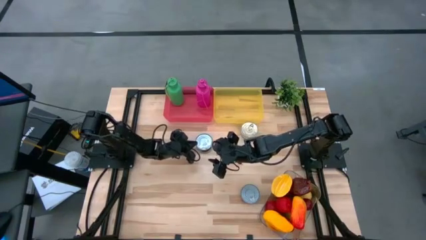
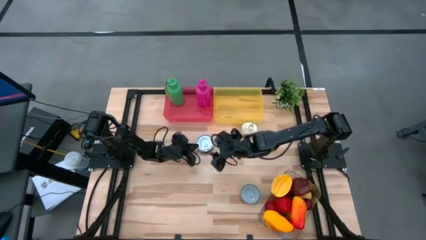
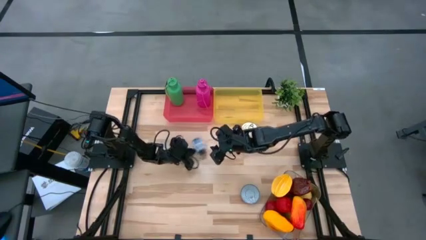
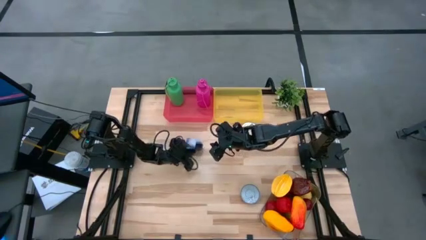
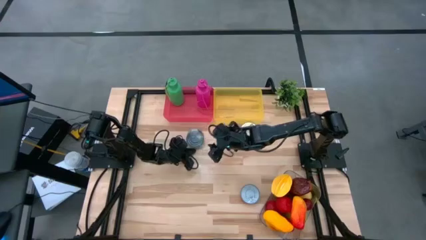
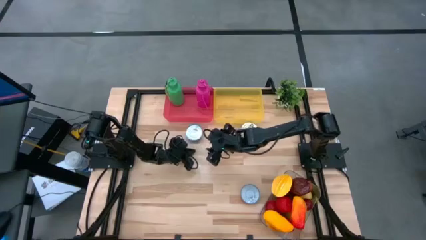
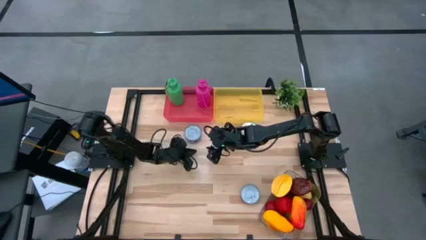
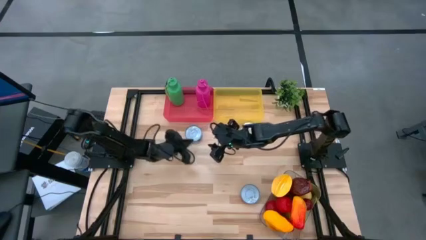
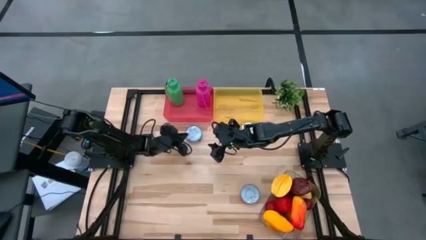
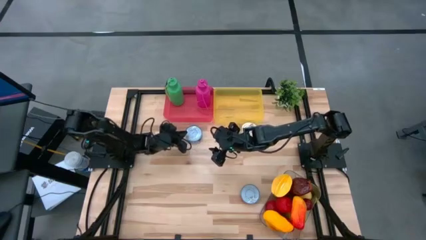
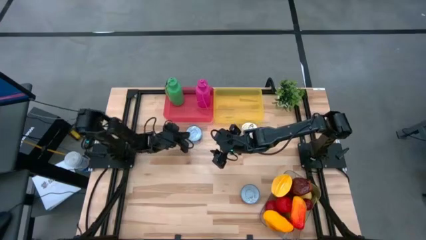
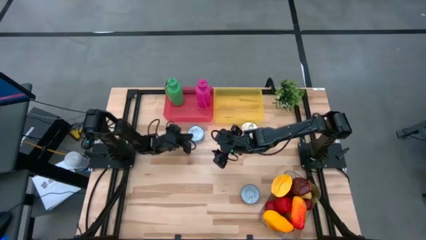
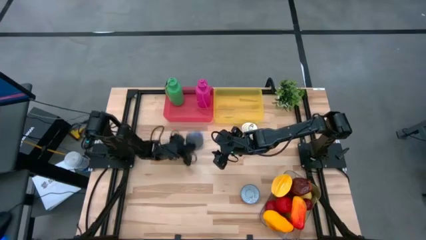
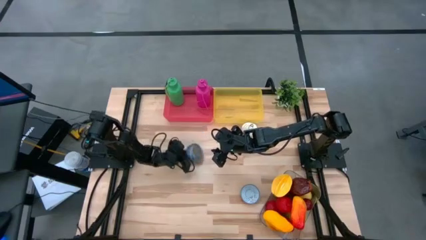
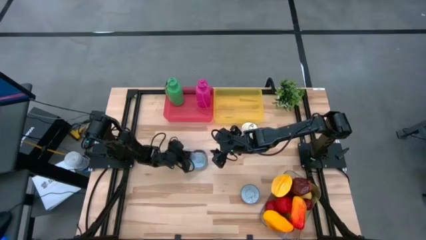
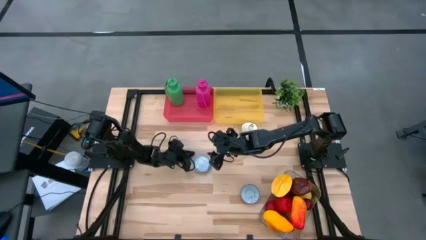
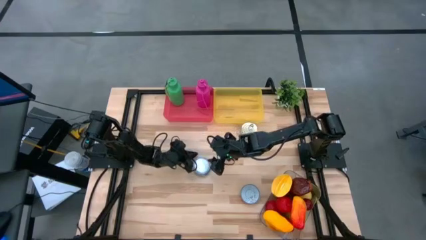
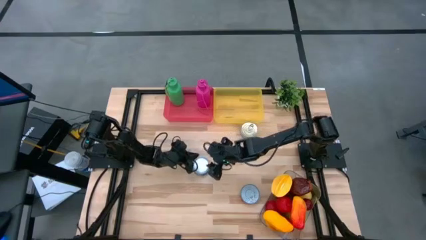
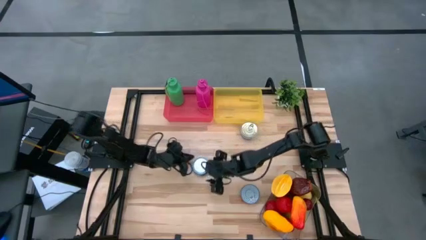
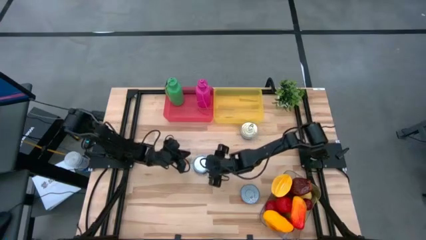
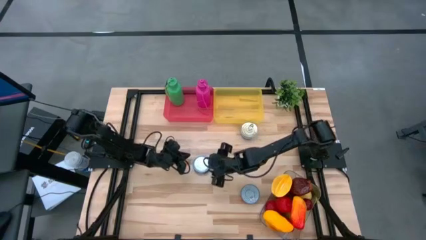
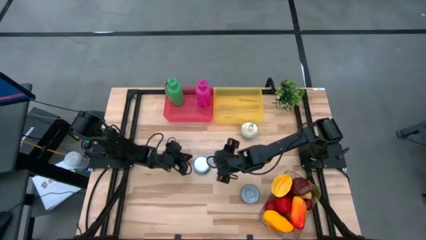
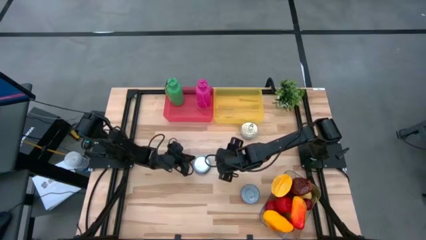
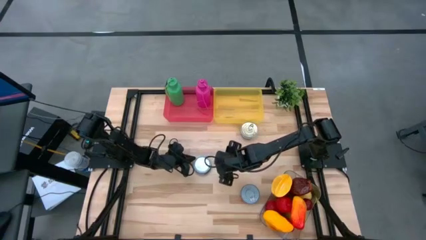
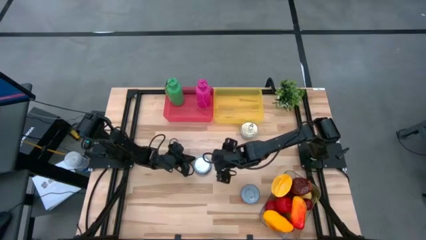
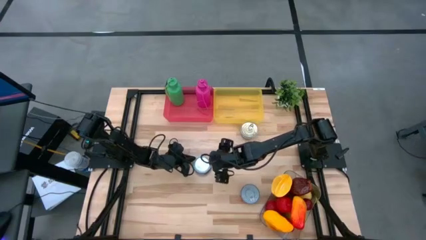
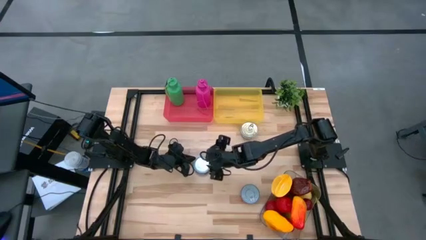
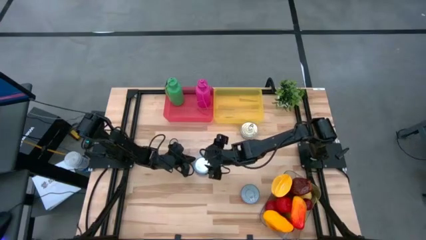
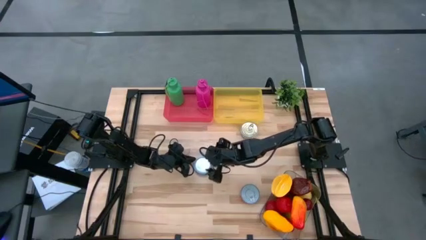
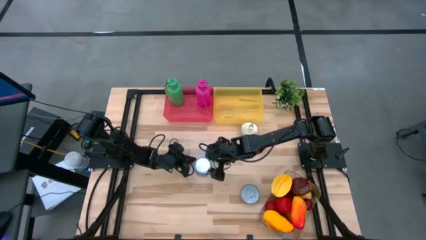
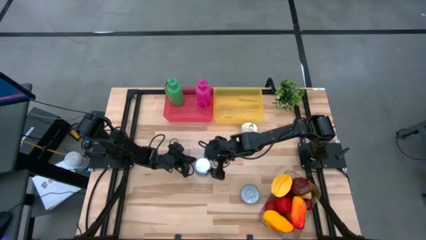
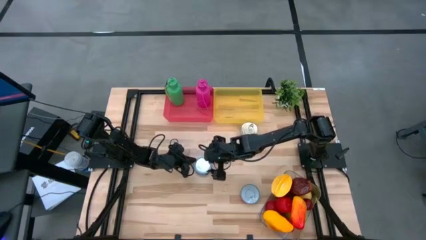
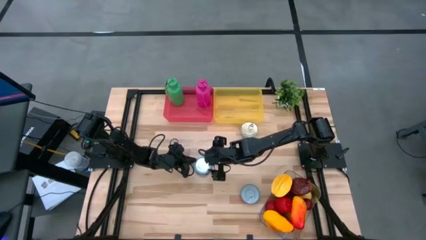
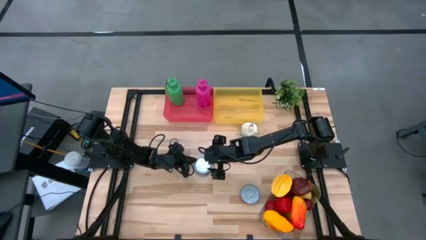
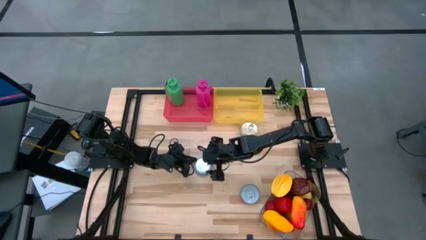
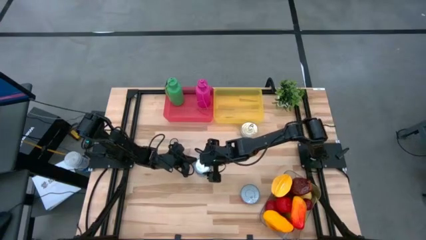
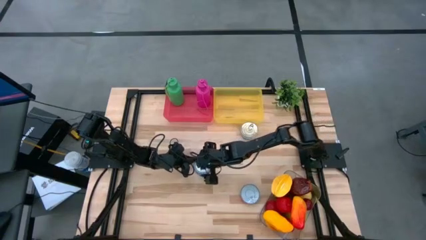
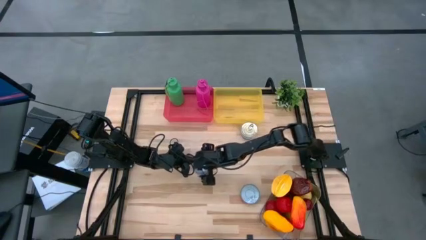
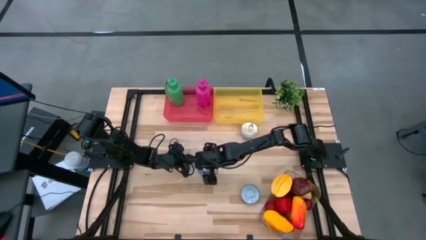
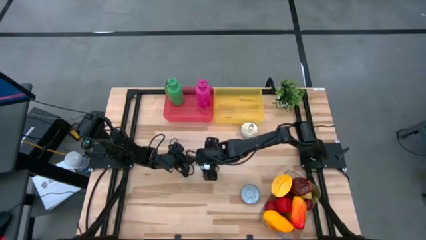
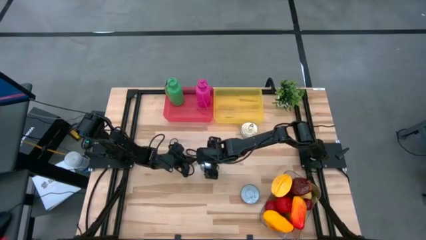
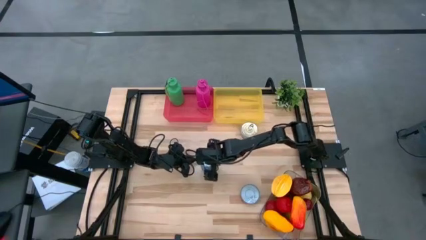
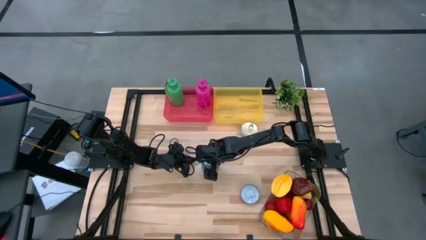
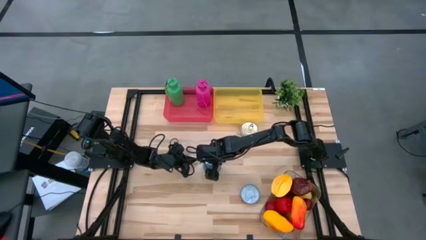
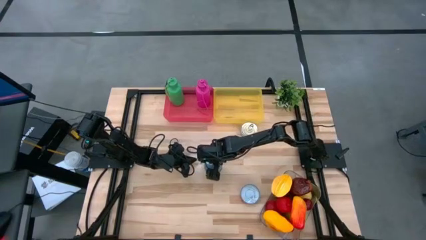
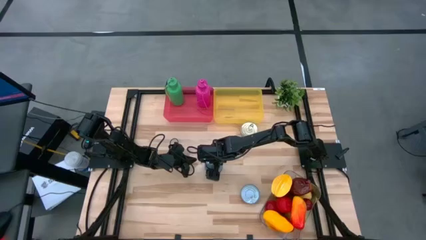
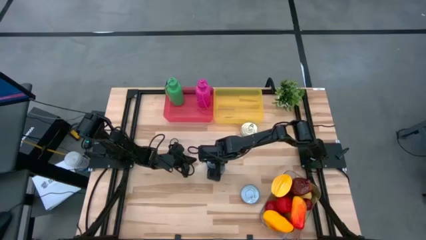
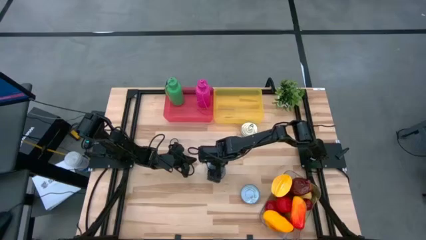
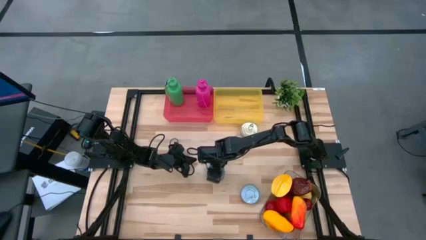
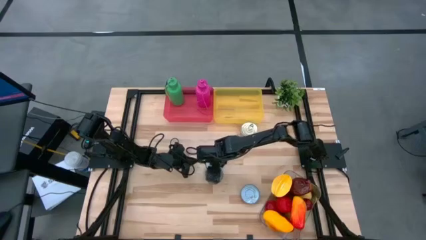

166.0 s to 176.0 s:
Task: Pick & Place Food Item
Put the blue tuna can into the yellow bin

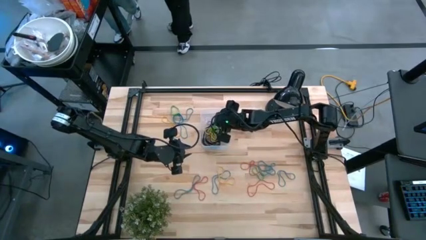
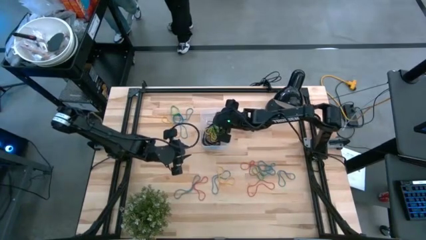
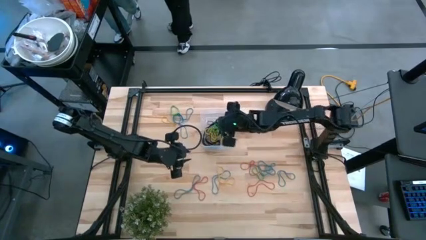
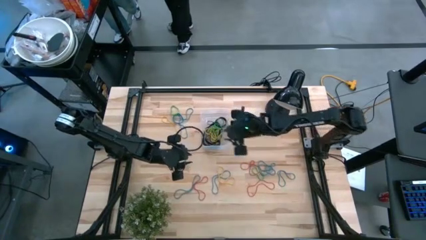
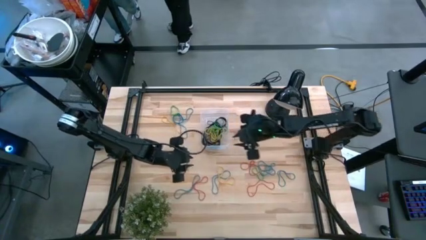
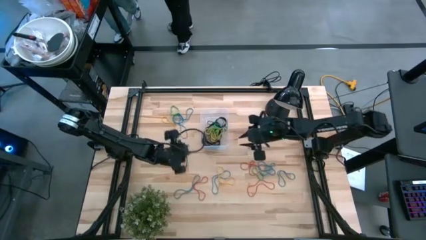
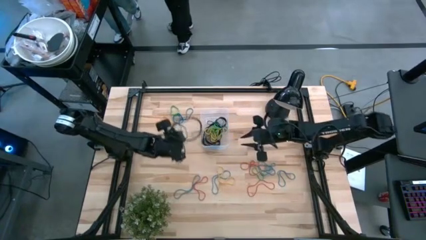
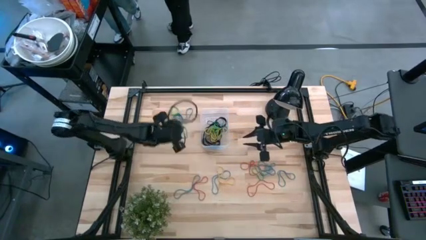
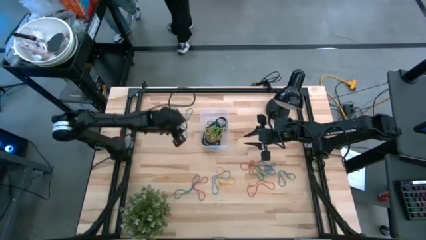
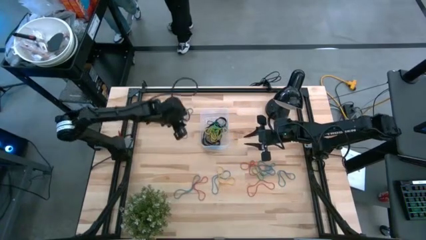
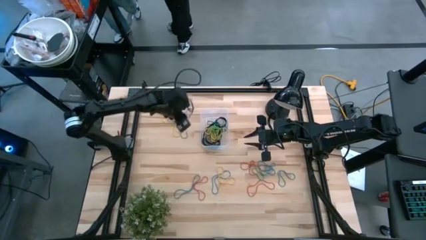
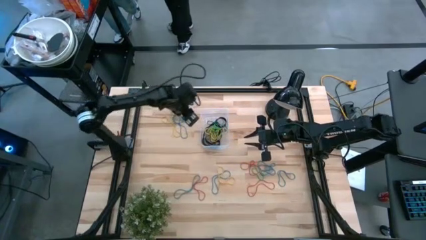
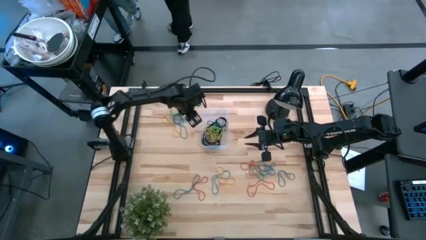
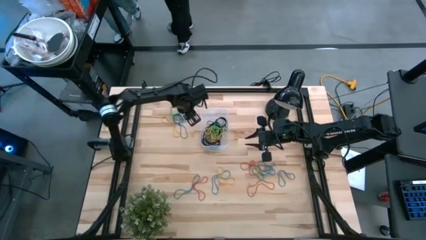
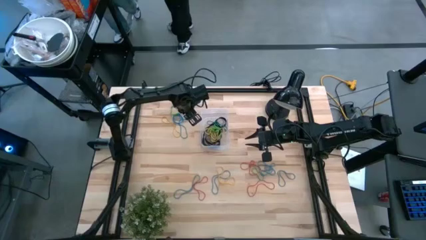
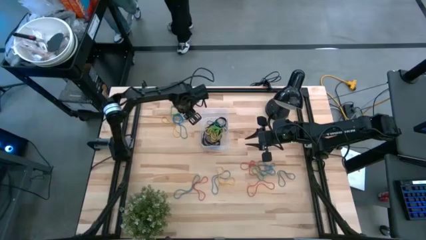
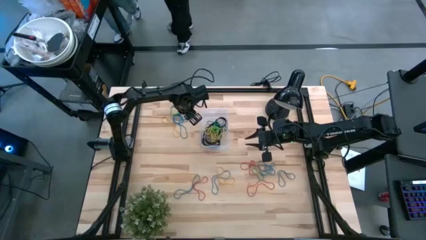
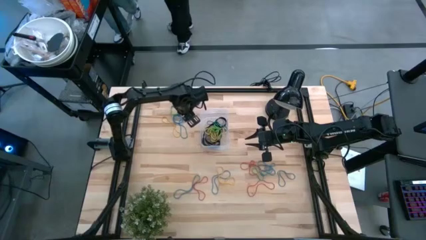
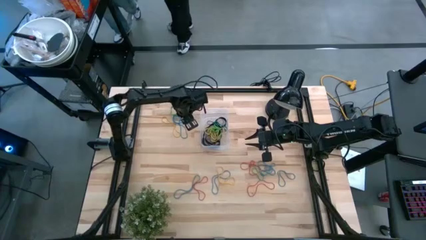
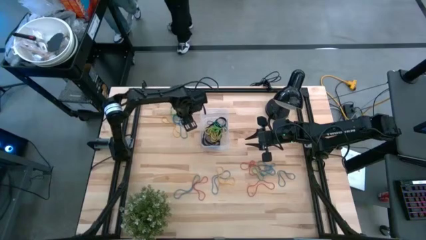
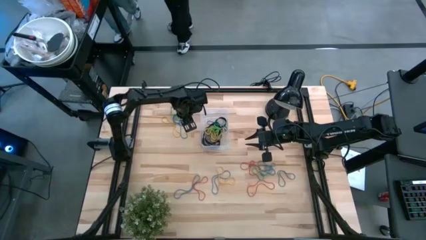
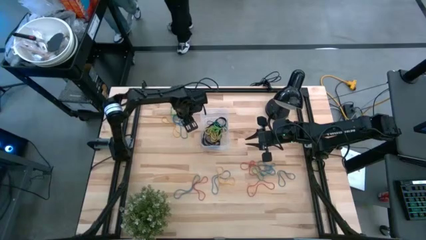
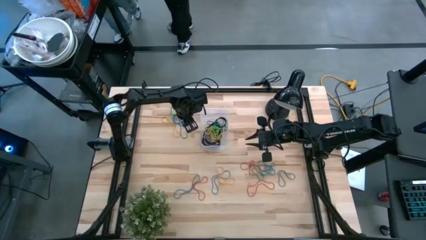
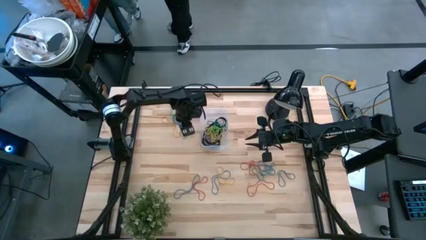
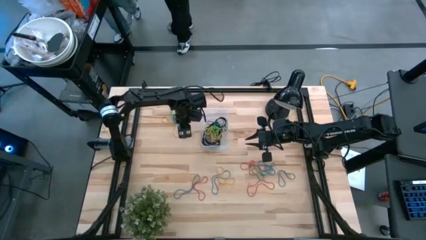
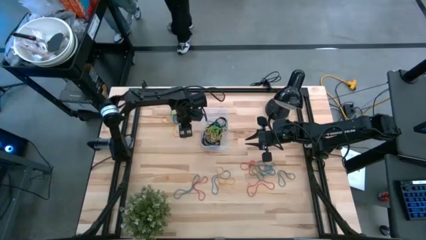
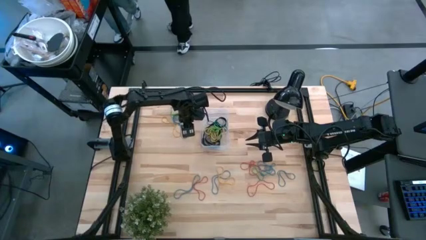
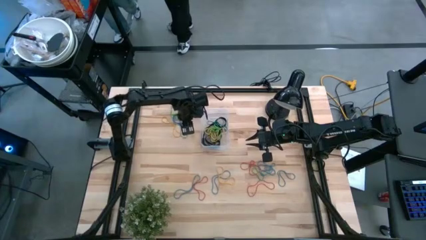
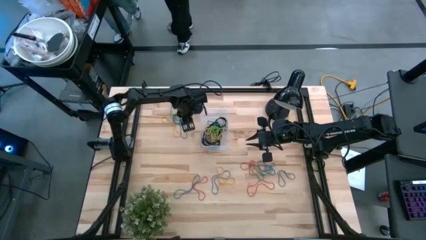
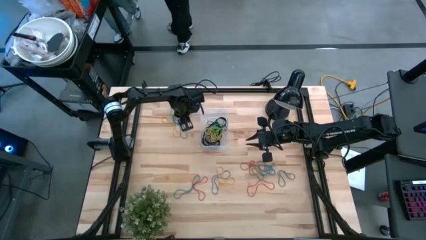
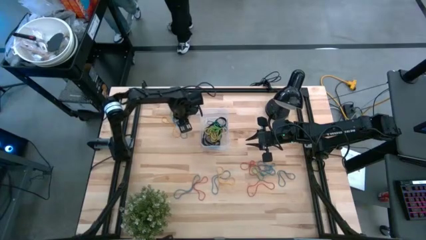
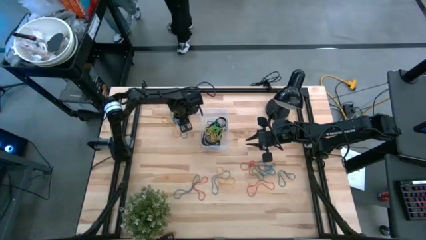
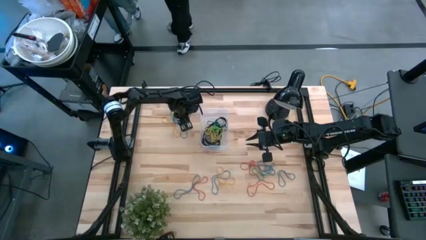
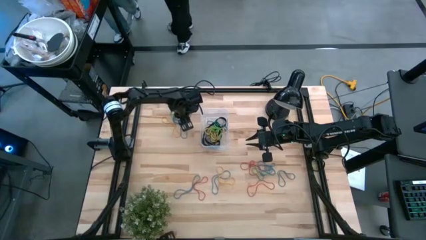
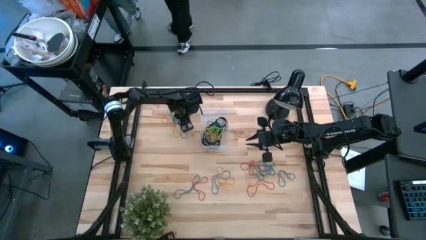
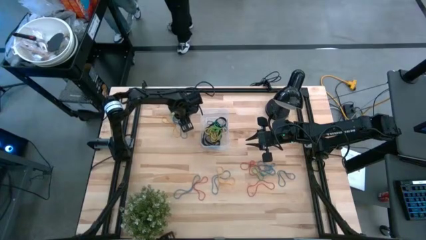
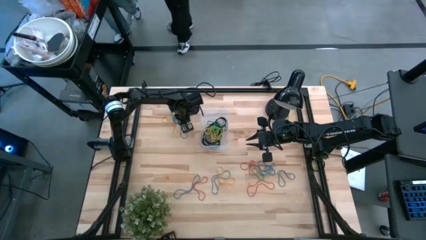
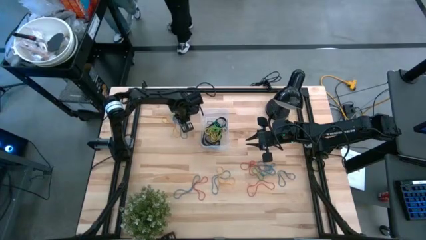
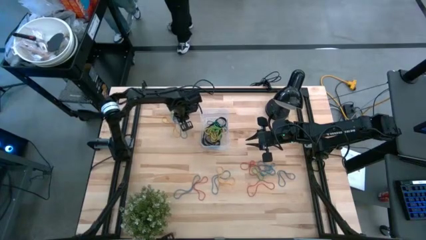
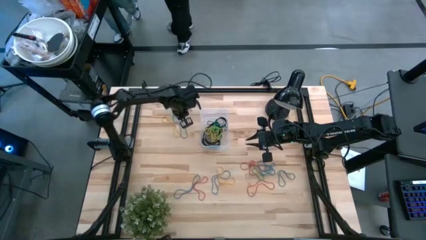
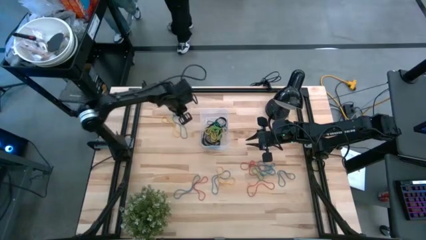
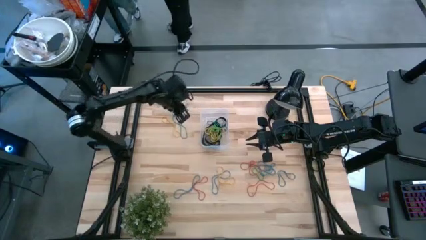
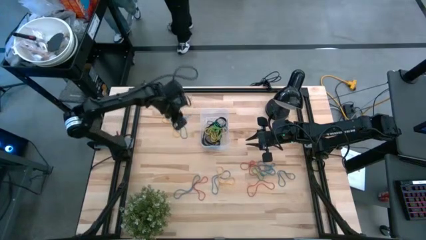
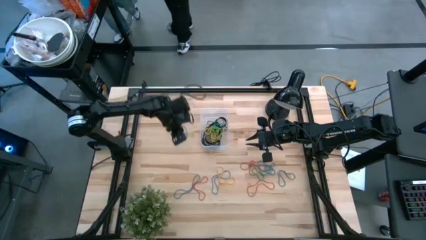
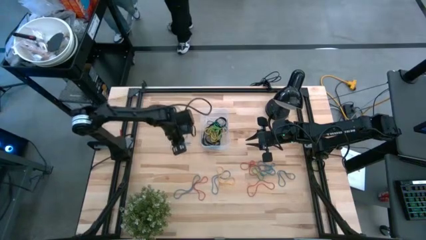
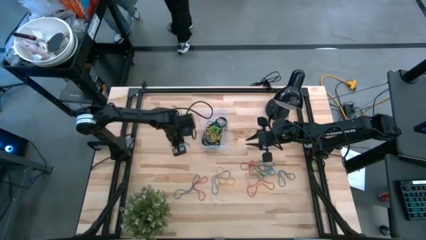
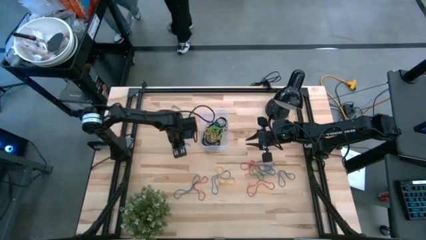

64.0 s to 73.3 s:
Task: Pick and place rubber bands into bin
Put the blue rubber band into the transparent bin
